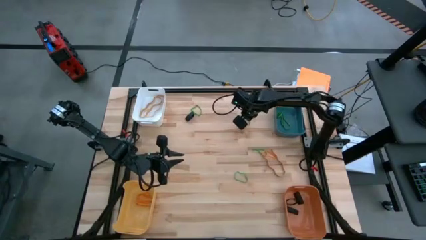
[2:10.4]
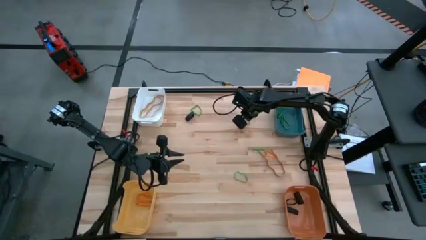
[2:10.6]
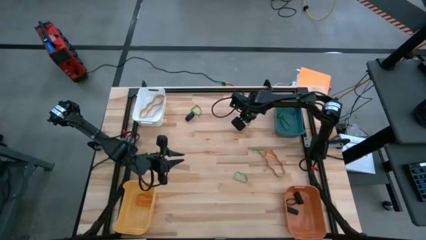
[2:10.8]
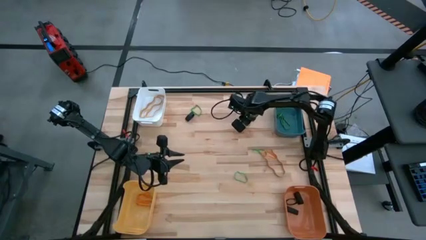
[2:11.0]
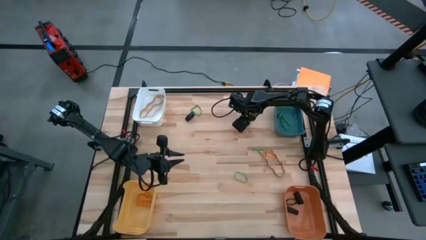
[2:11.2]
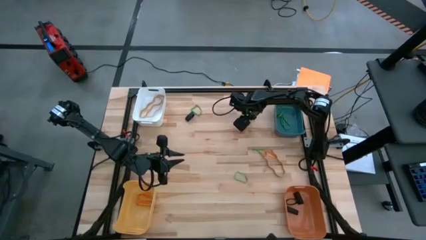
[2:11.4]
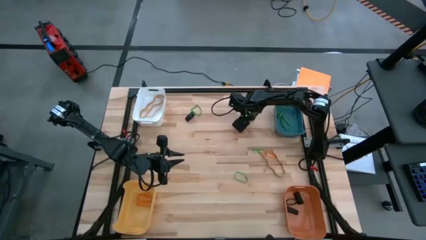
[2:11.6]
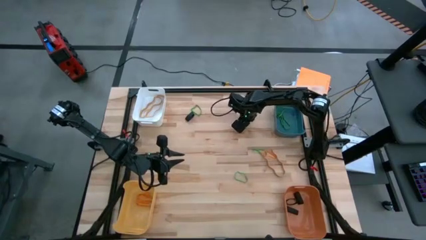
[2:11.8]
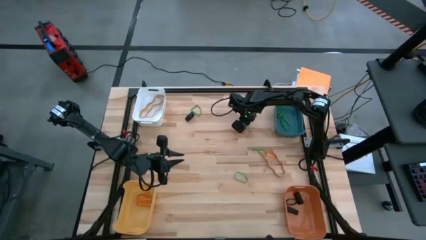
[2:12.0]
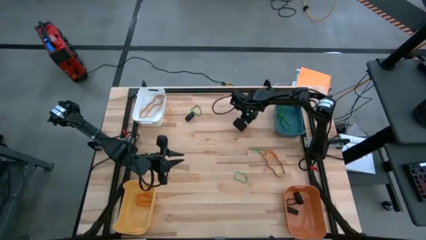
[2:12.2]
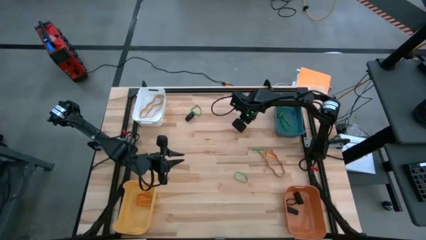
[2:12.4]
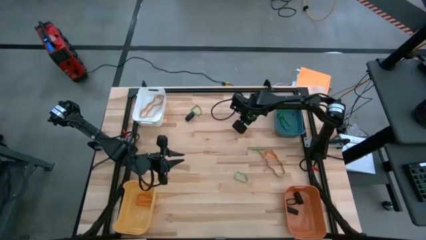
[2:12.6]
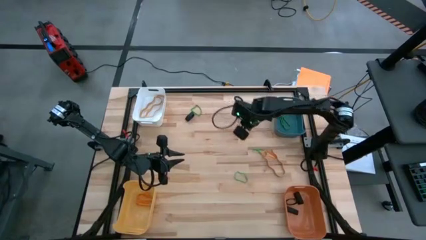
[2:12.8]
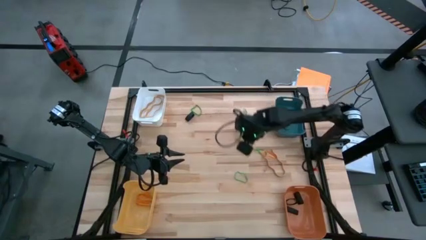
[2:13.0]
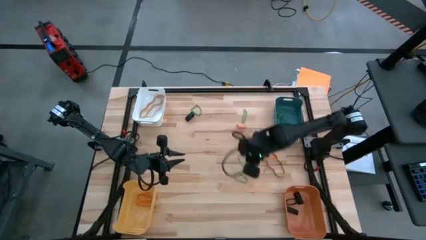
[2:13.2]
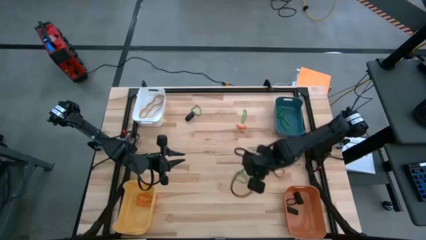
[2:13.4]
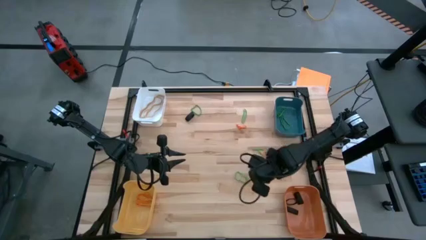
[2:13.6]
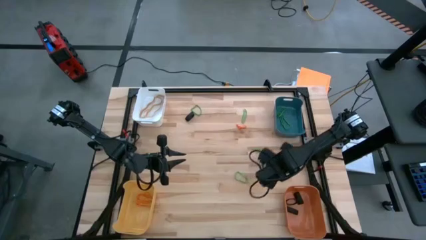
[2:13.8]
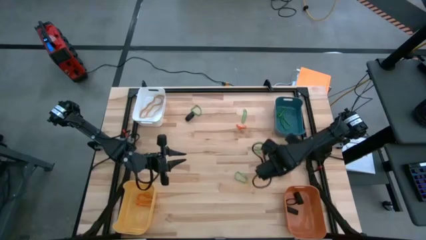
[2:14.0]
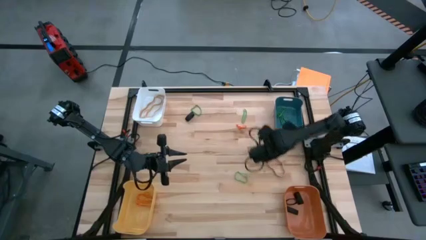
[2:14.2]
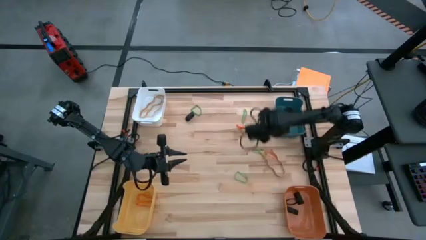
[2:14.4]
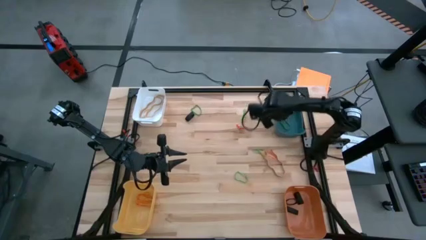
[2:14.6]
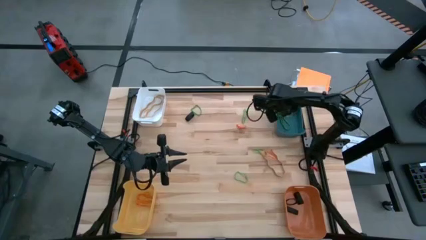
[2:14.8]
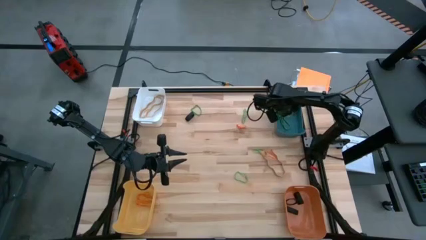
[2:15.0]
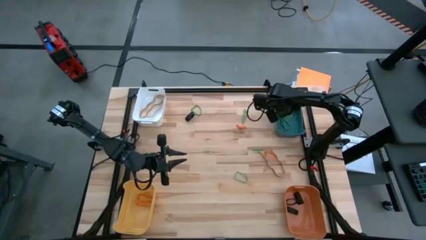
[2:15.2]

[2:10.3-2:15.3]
Task: Sort rubber bands into baskets
Put the green rubber band into the blue bin

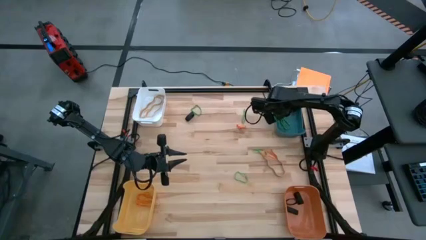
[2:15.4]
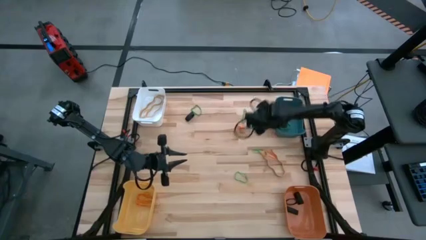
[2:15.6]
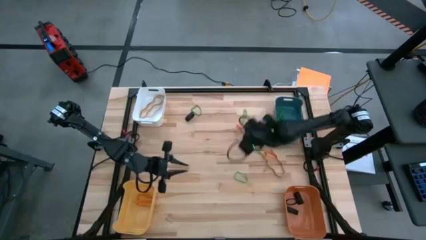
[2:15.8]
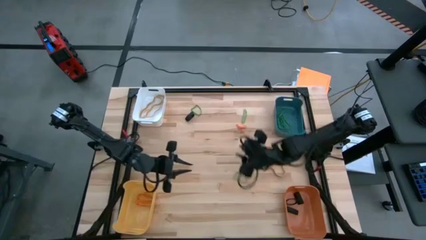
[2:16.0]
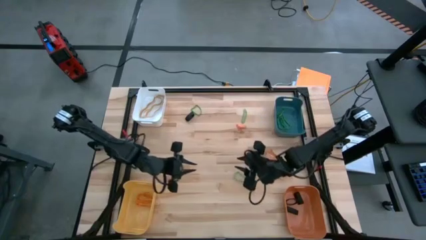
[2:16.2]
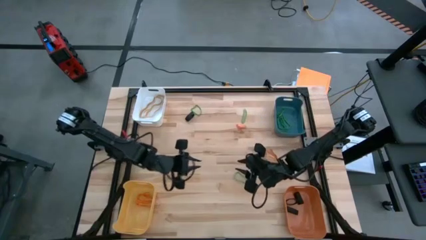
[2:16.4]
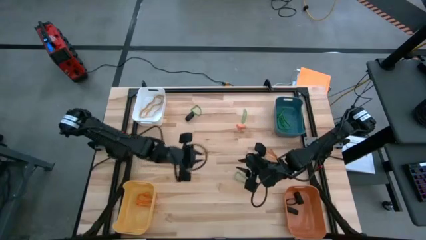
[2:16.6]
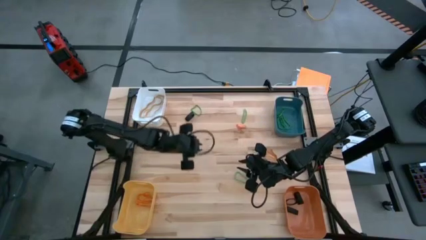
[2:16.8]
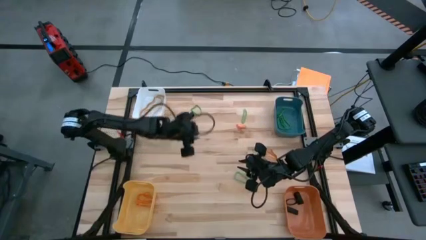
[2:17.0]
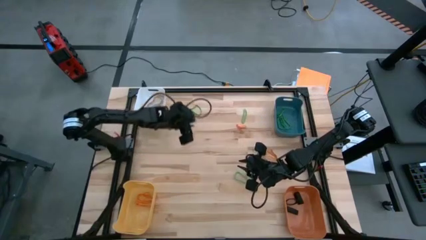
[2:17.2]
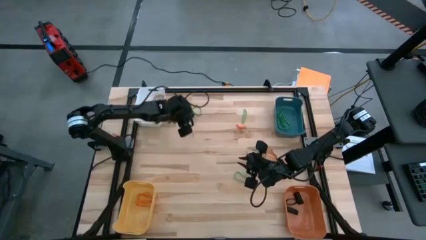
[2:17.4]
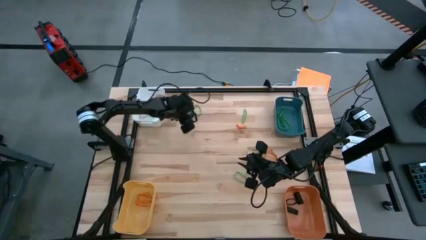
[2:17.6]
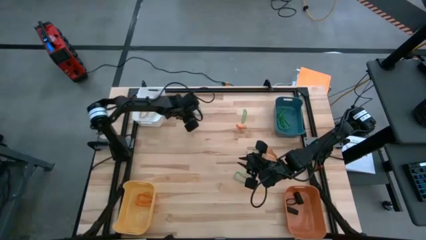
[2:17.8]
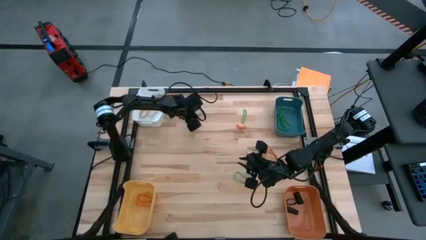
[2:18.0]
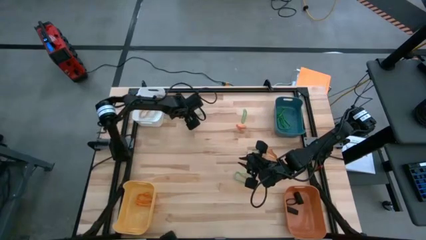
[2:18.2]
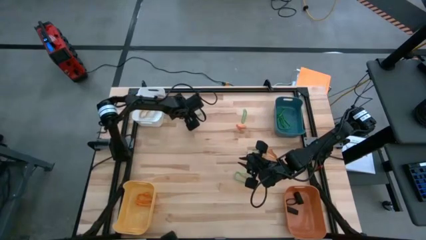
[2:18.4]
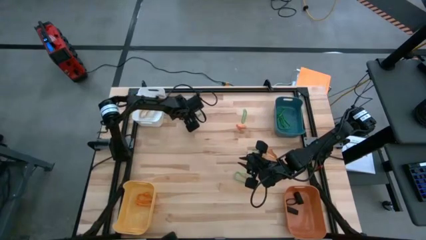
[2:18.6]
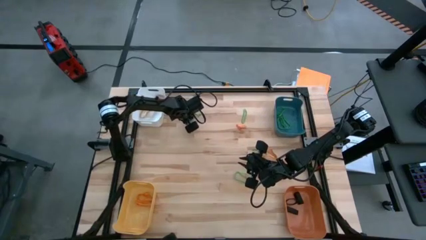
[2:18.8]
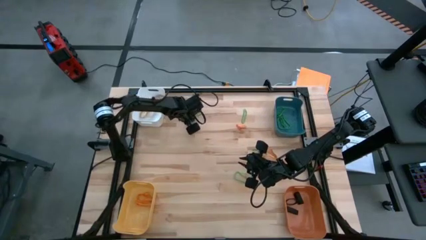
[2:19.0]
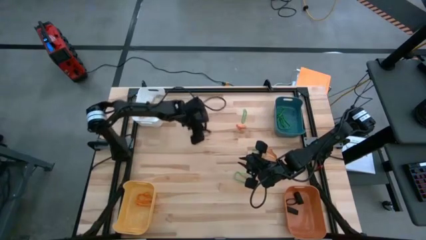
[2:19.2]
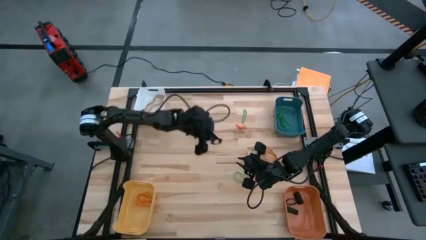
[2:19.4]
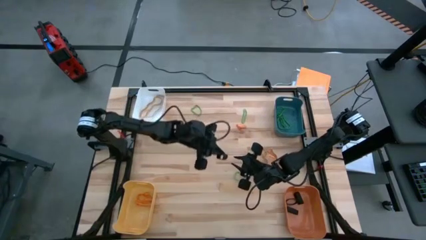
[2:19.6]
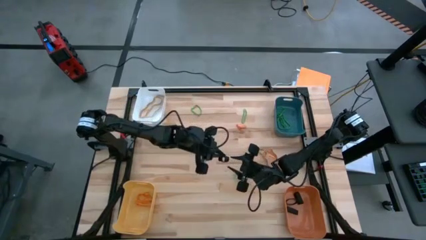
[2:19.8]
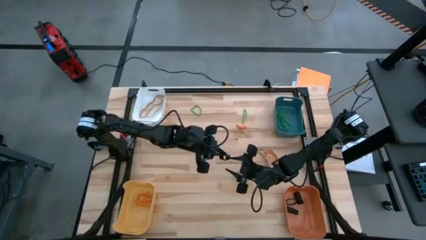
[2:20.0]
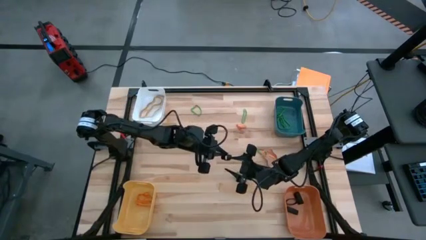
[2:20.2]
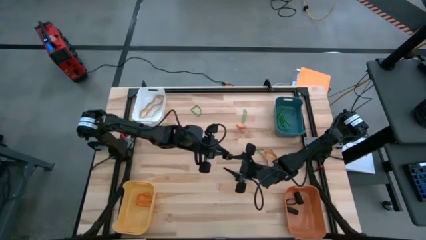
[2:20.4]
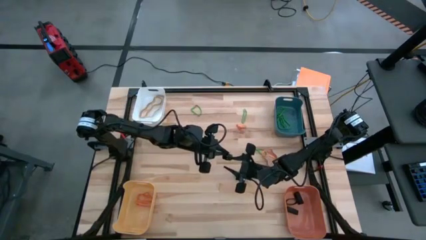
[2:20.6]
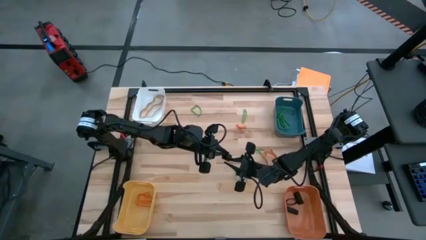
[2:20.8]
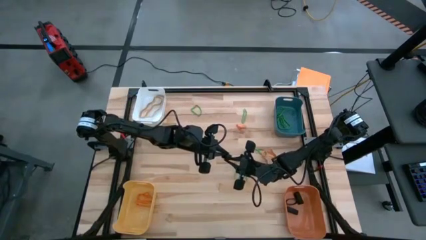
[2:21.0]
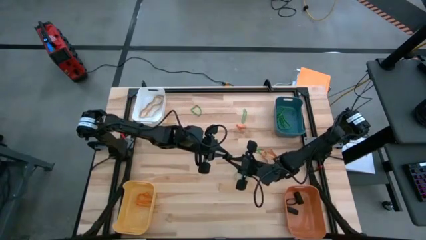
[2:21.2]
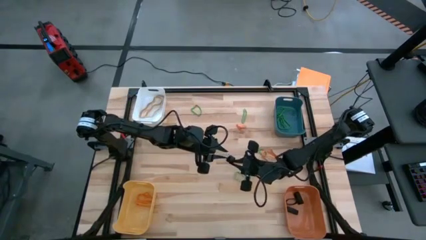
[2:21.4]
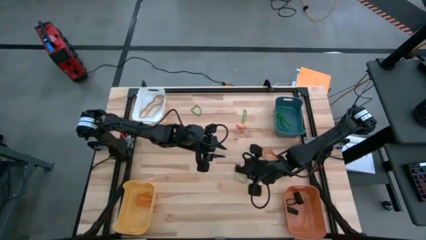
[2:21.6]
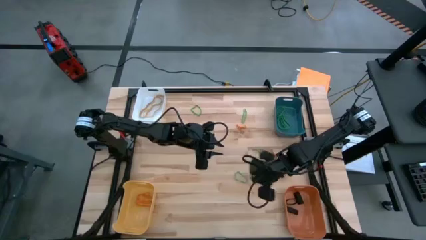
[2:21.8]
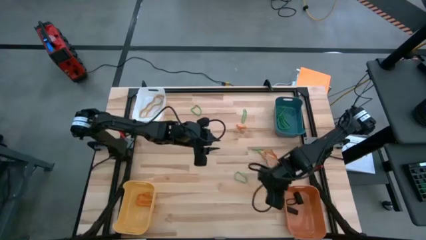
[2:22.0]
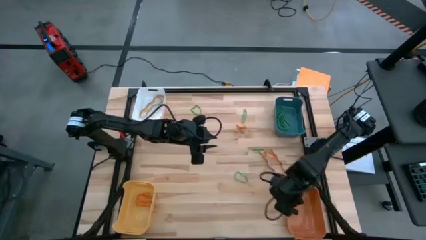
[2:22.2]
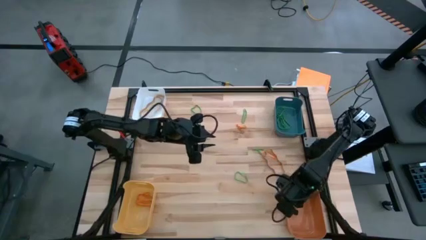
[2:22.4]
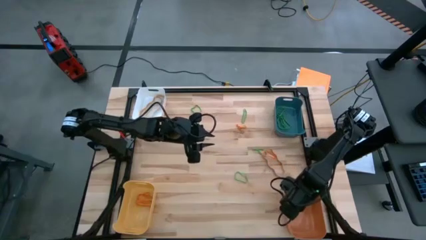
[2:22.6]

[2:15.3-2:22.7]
Put the black rubber band into the orange bin

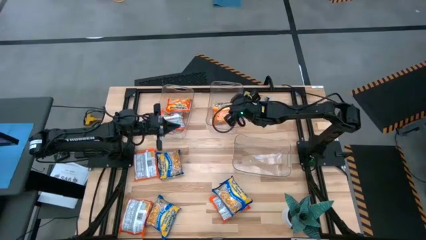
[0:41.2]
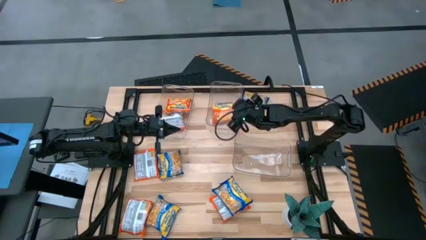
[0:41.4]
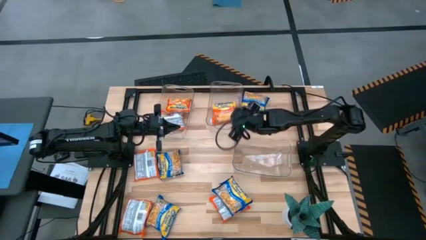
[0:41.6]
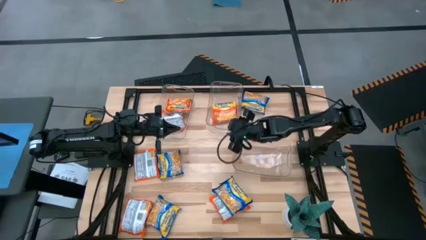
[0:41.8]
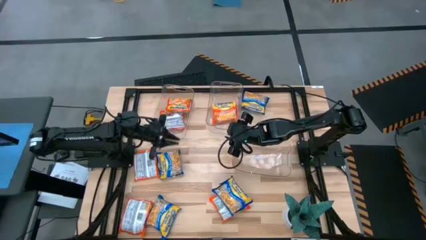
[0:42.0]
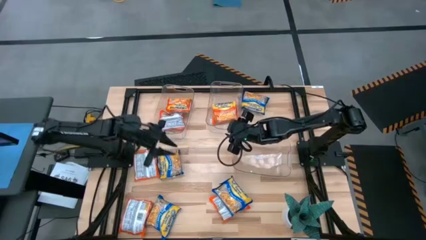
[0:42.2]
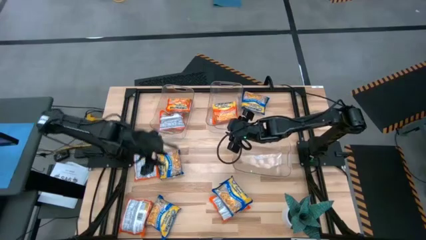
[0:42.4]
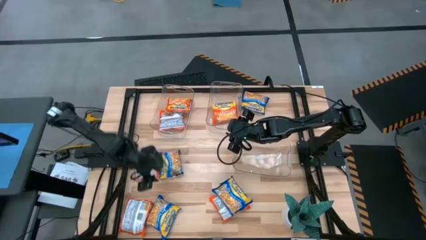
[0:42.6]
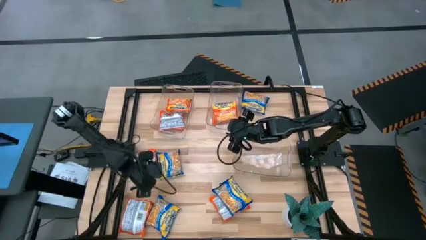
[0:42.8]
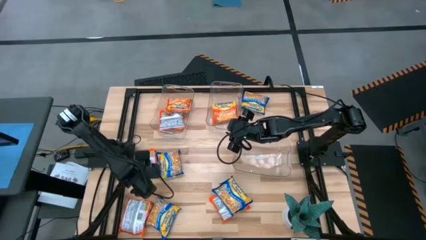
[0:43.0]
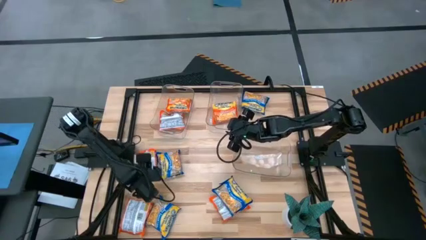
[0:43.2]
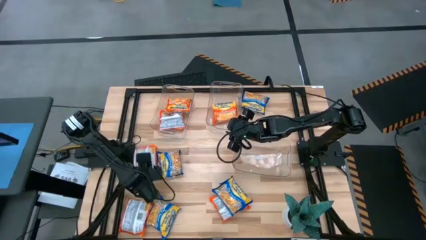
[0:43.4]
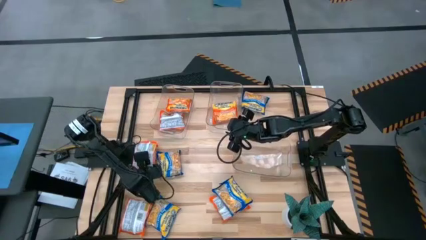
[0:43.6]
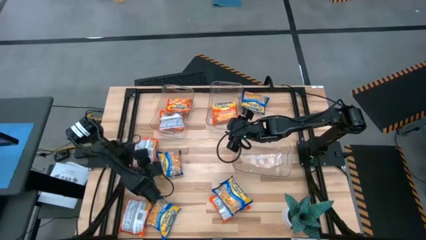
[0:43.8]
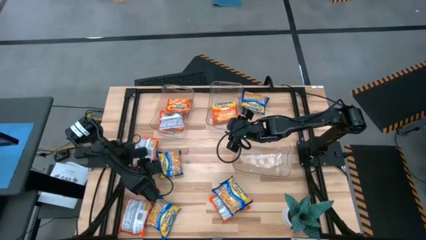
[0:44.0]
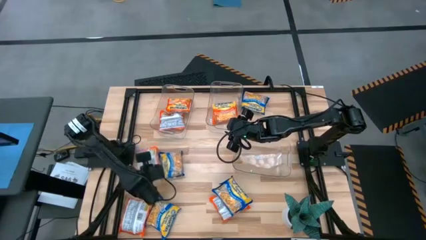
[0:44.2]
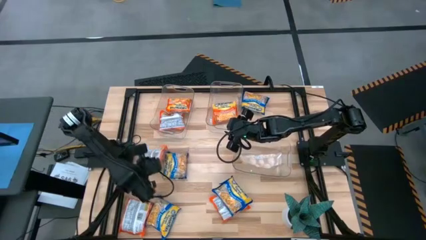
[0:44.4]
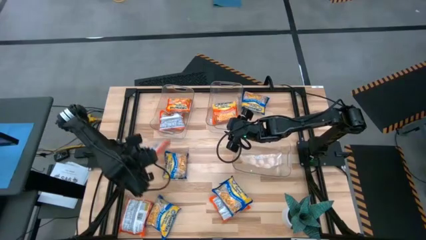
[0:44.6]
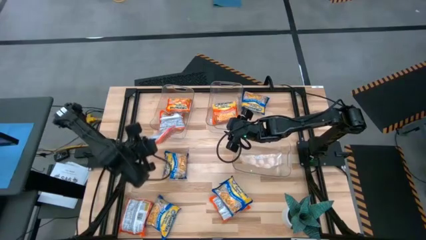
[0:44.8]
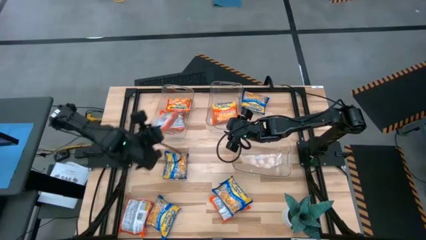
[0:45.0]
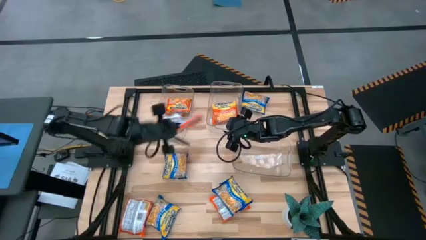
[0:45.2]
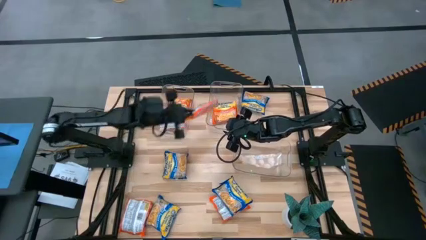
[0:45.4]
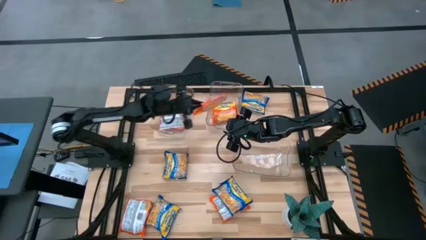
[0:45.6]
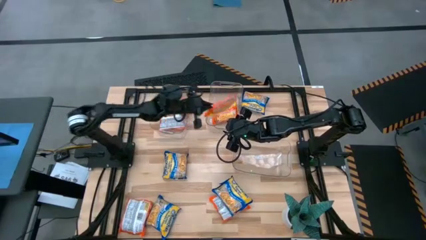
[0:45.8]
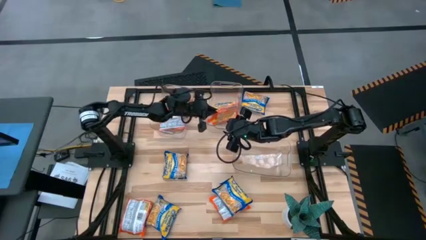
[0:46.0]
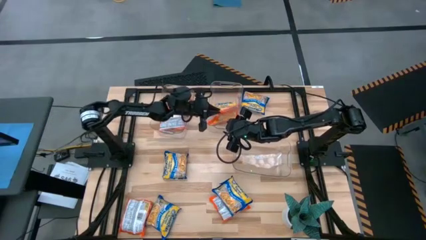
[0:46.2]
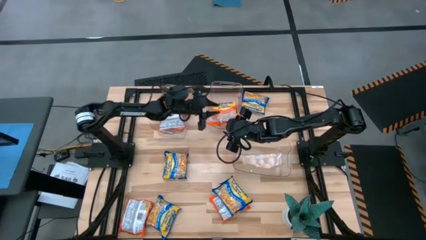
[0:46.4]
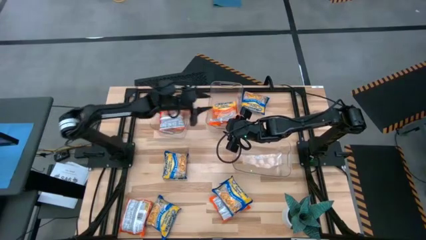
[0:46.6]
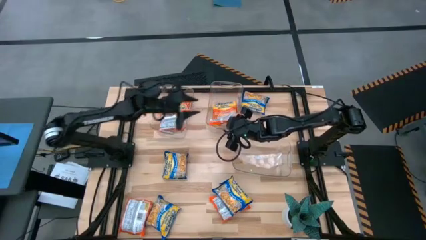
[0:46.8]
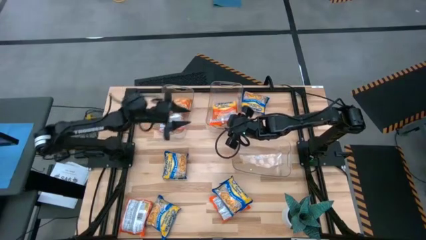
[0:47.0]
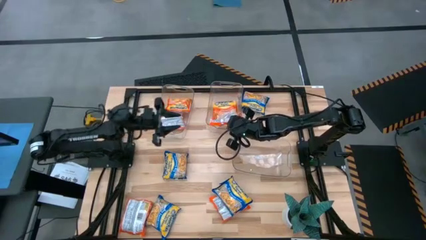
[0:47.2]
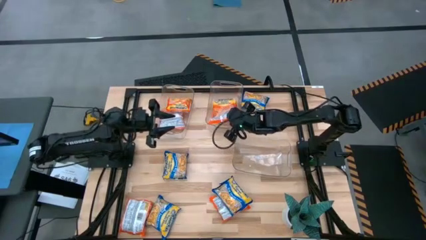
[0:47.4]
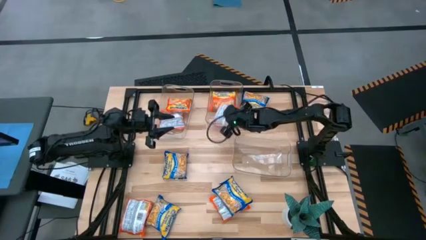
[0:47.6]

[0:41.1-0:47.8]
Task: Sort Maruchan noodles
Put the orange bag into the top right transparent bin
